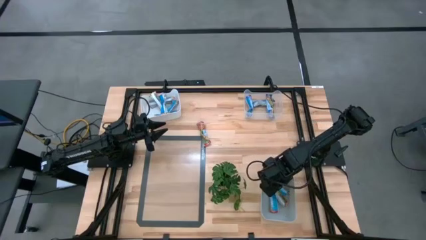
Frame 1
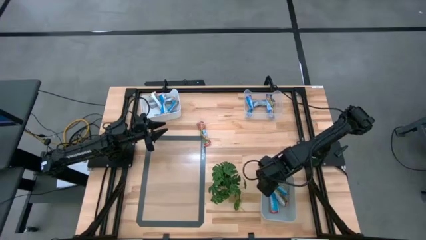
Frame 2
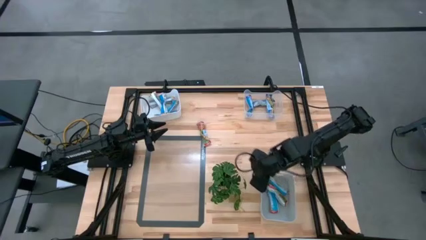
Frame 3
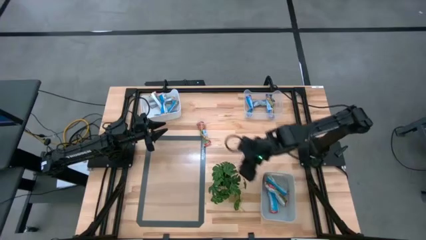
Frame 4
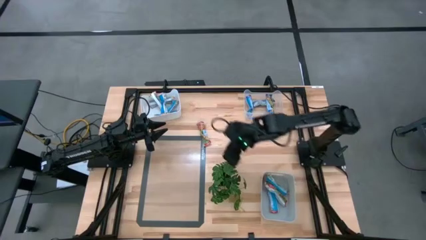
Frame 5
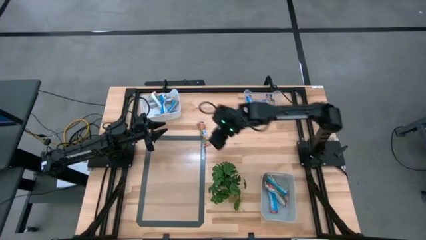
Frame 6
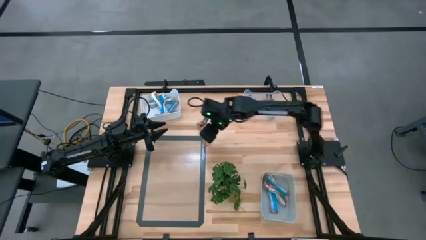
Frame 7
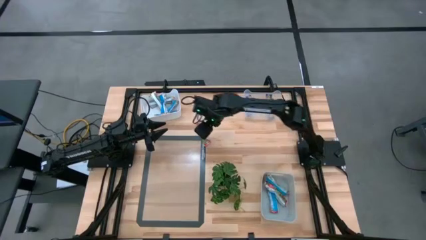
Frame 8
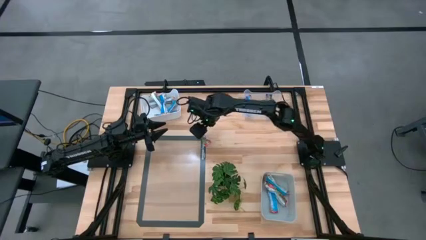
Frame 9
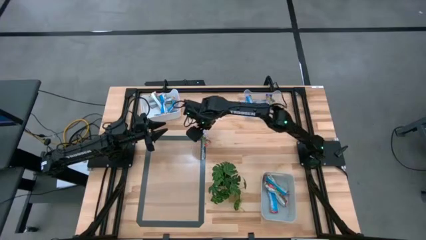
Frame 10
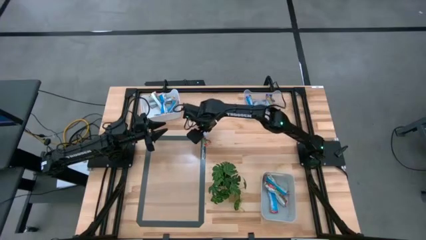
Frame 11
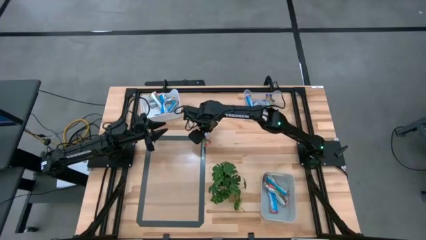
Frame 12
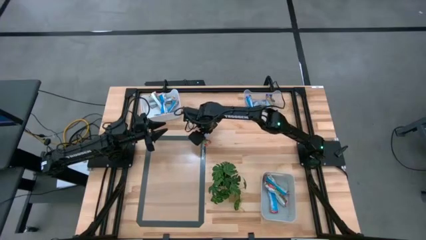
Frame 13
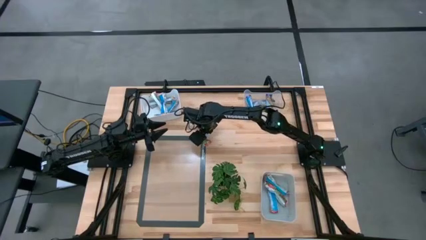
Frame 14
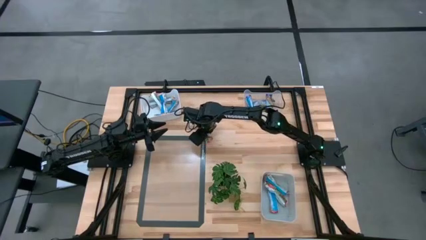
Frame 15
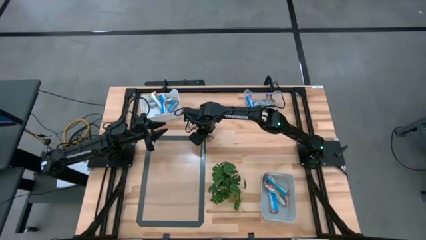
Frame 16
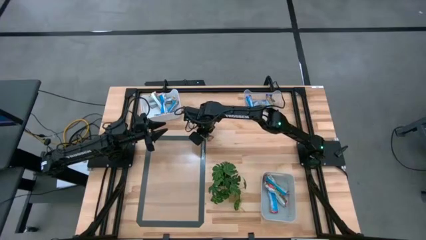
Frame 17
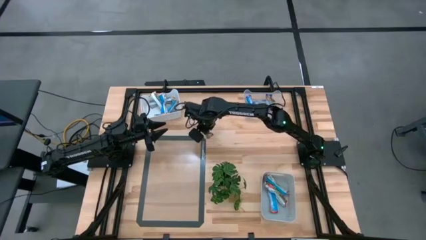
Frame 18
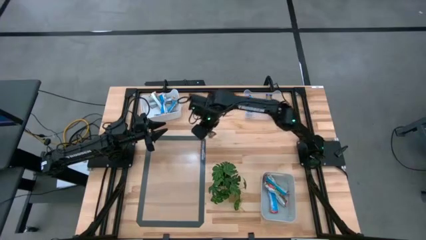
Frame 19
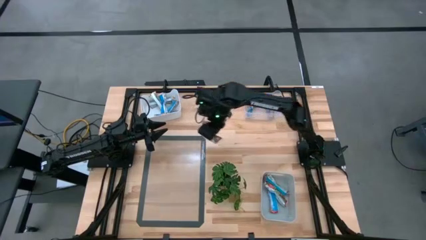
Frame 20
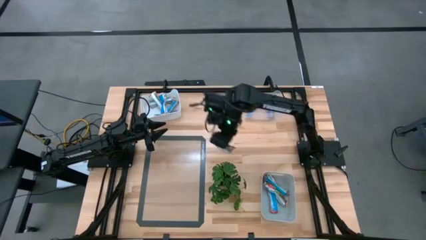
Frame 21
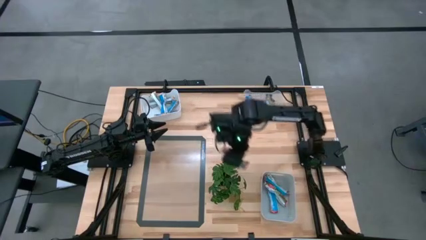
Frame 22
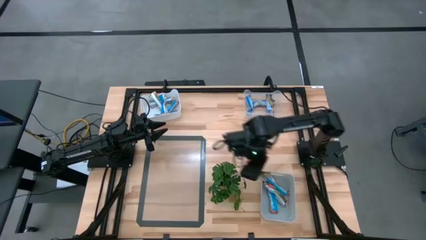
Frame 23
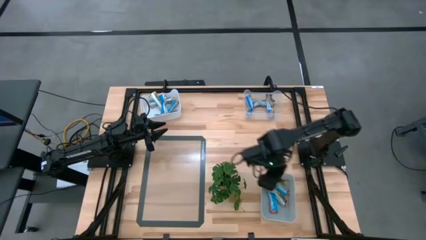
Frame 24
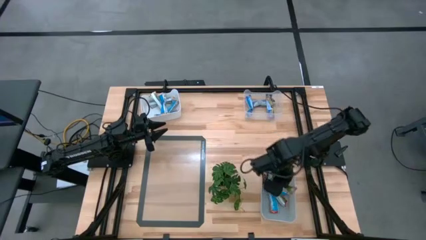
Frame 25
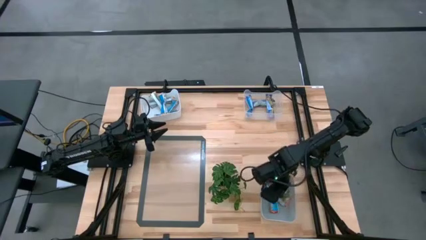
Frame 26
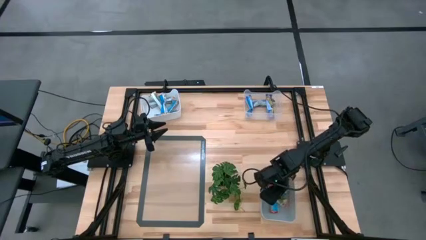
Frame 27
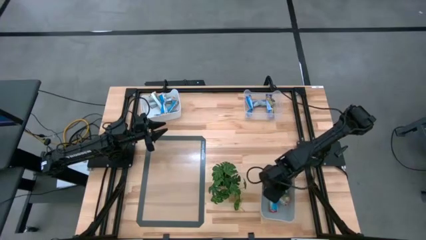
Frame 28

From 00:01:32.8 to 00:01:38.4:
Task: Pick and place Granola Bars by type
Put the red granola bar into the gray bin

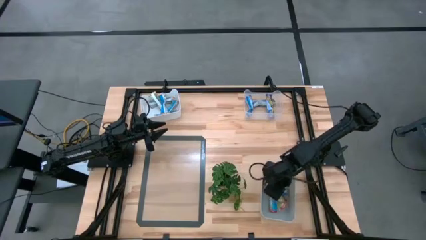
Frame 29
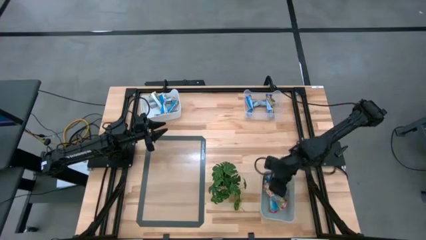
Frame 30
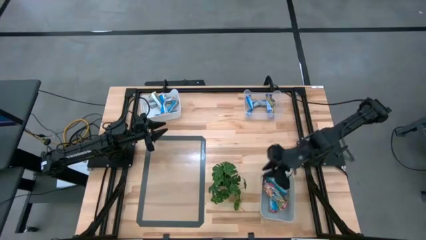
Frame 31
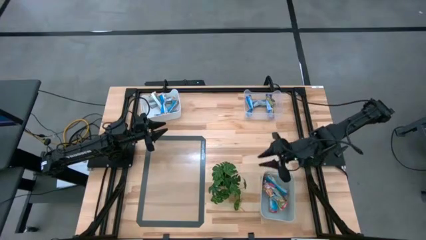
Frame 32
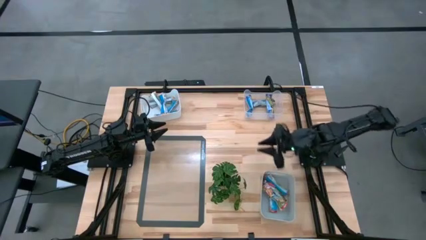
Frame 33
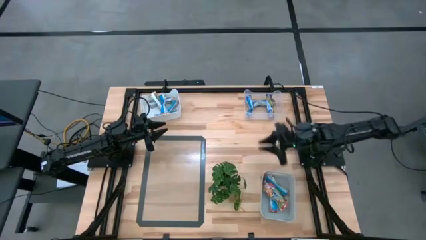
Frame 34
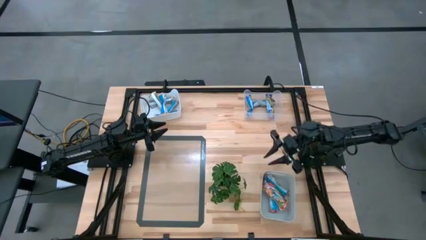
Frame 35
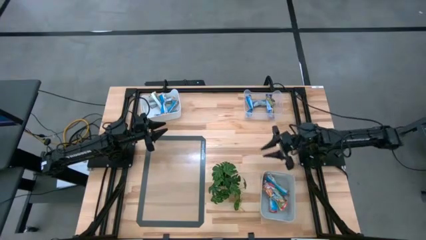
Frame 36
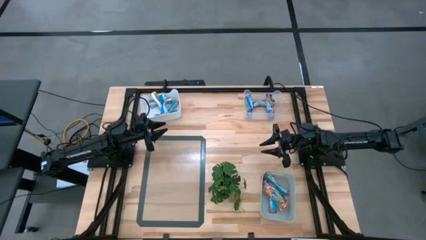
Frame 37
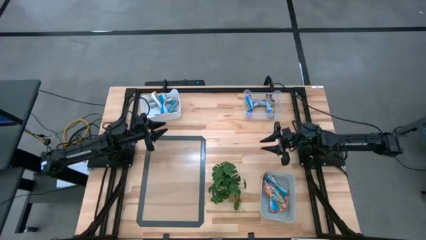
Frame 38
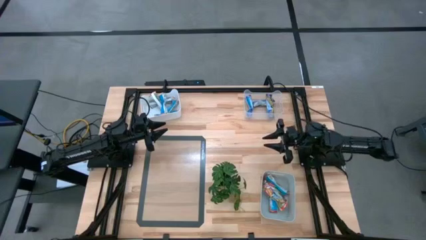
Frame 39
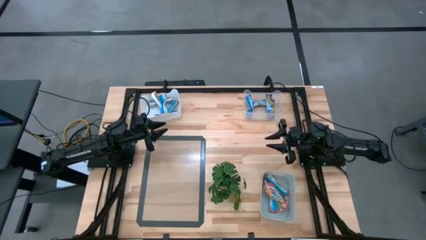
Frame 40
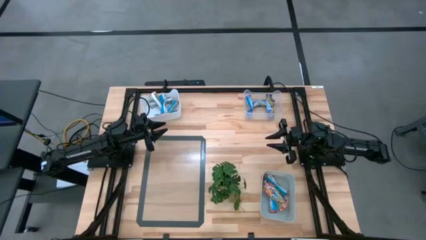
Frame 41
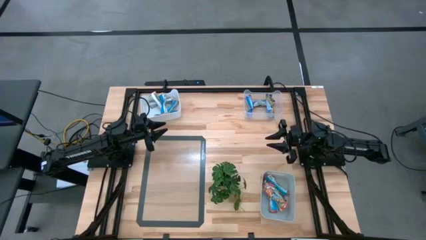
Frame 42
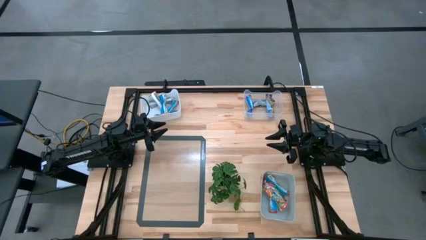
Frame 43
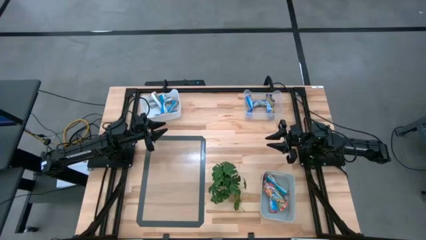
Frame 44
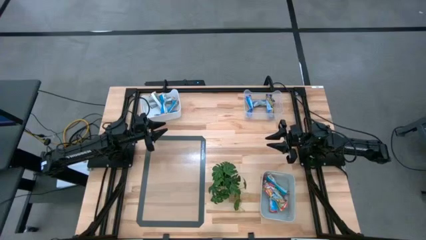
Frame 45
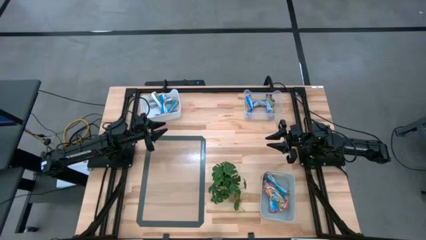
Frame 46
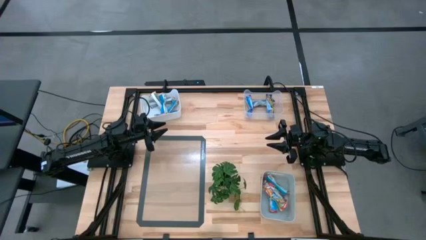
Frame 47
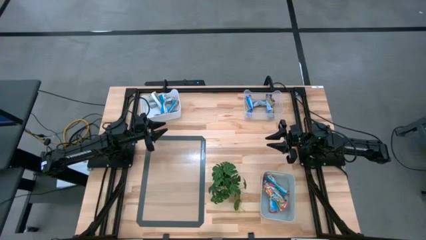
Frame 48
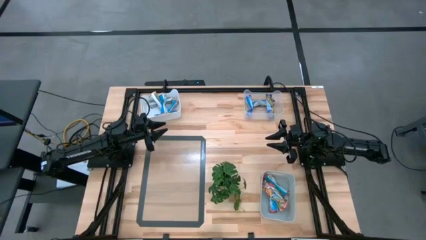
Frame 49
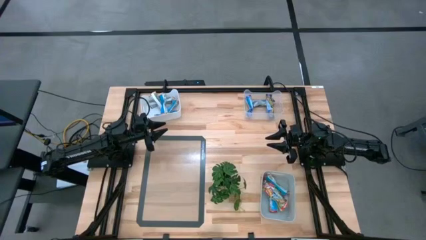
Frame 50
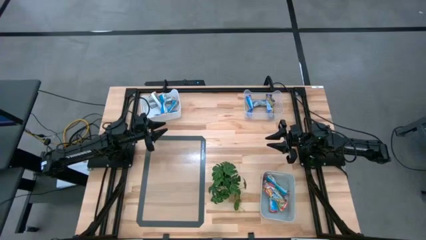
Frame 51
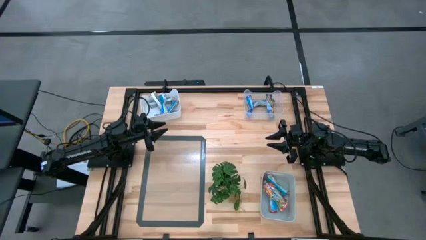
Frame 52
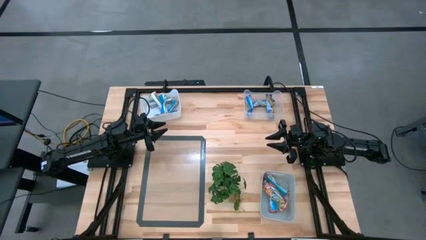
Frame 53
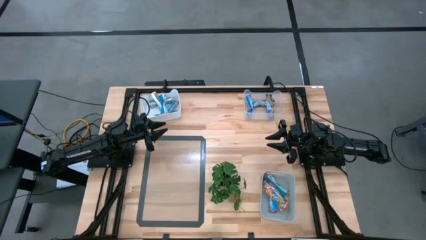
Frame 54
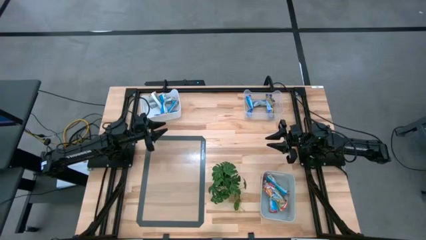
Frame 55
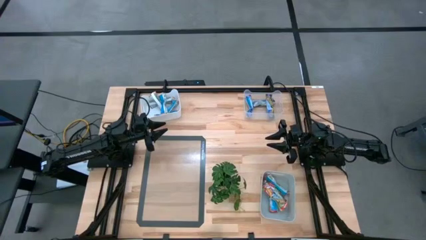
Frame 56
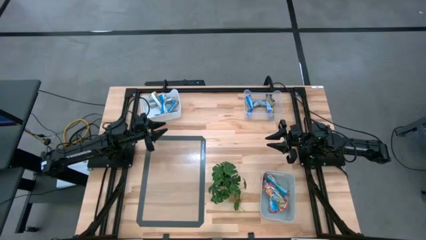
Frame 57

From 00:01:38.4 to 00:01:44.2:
Return to Home Position

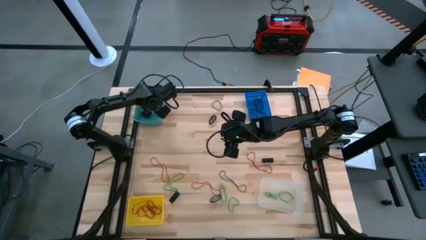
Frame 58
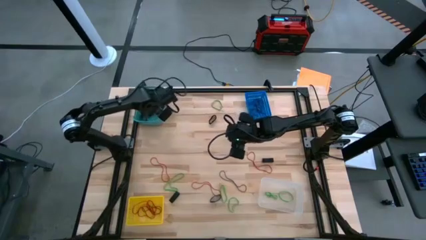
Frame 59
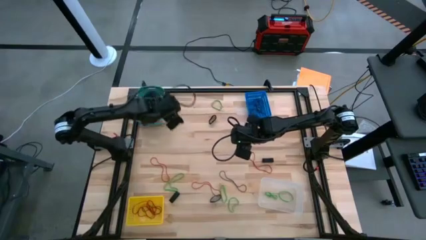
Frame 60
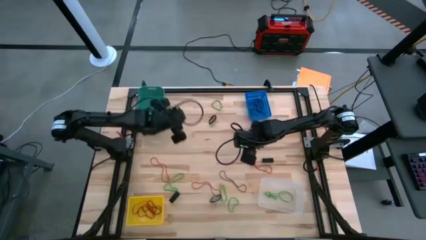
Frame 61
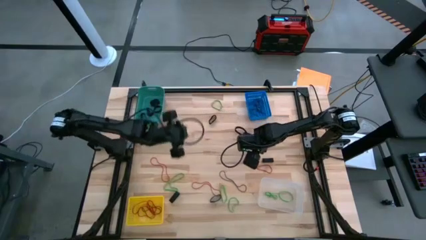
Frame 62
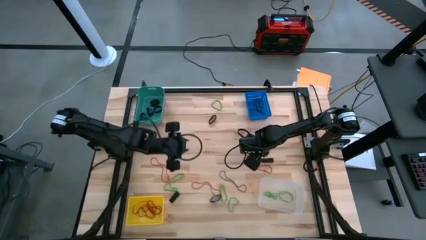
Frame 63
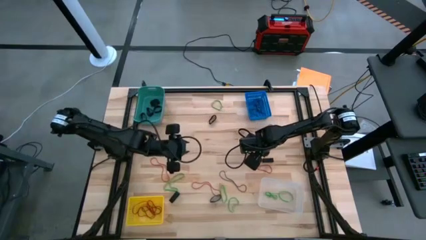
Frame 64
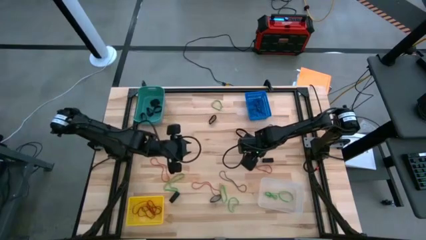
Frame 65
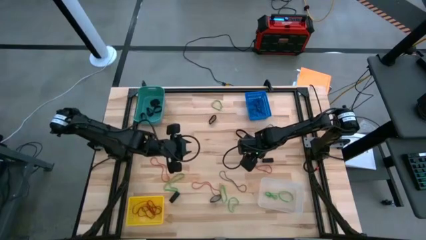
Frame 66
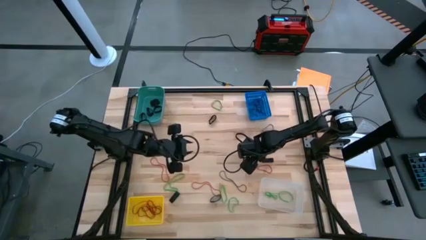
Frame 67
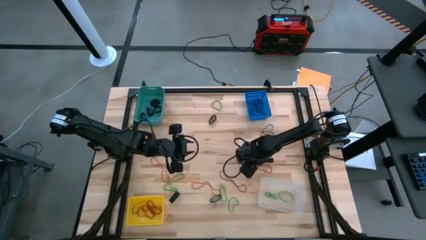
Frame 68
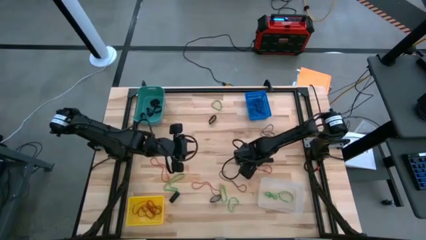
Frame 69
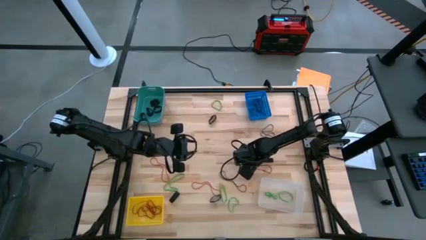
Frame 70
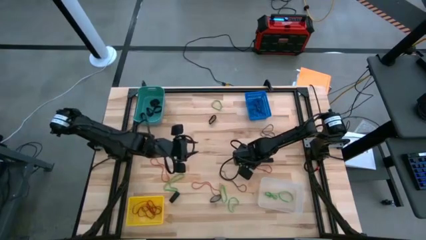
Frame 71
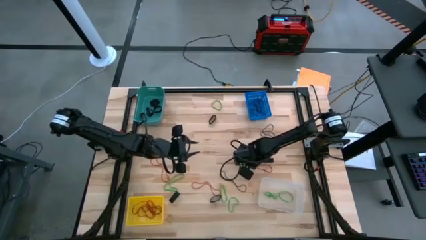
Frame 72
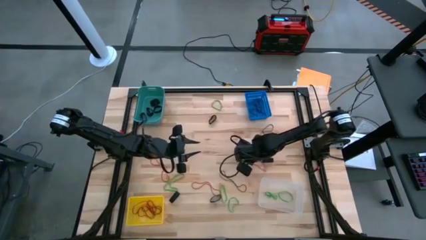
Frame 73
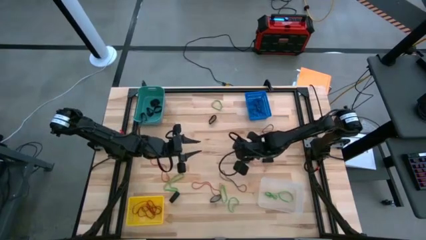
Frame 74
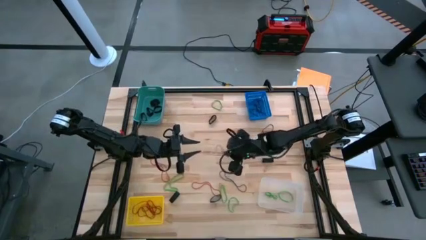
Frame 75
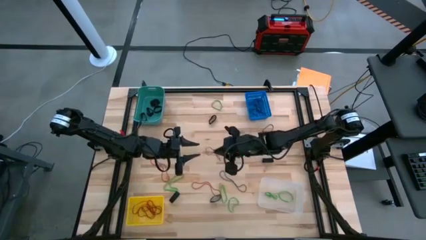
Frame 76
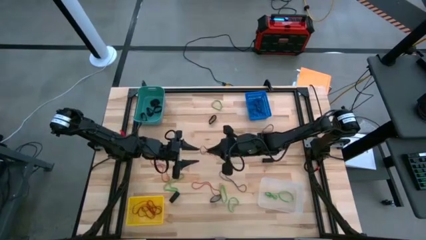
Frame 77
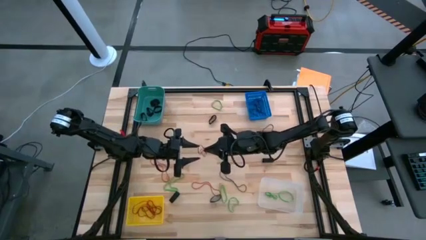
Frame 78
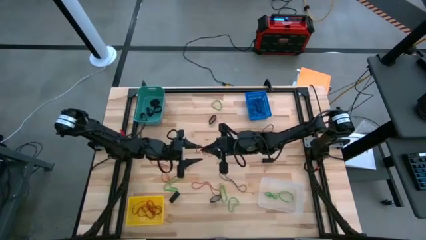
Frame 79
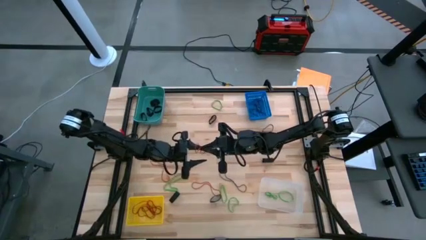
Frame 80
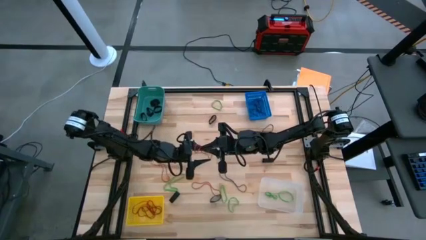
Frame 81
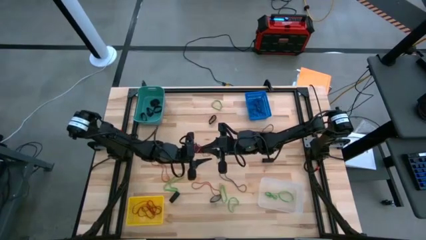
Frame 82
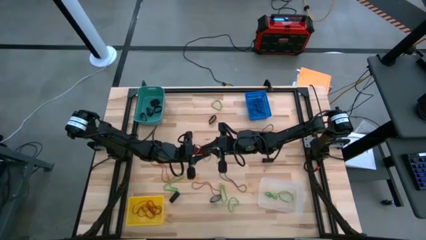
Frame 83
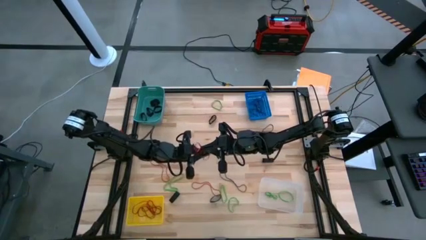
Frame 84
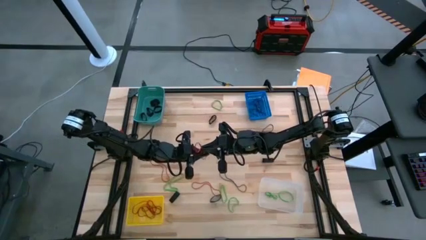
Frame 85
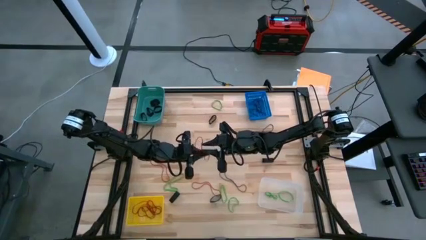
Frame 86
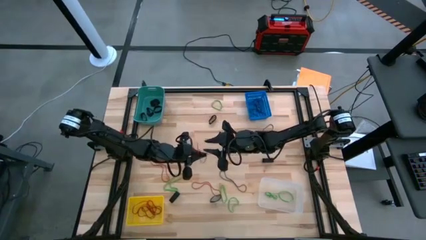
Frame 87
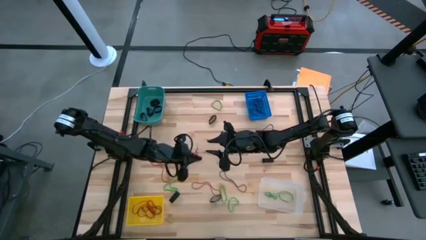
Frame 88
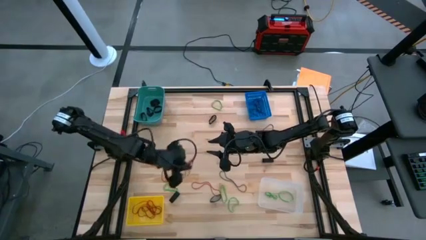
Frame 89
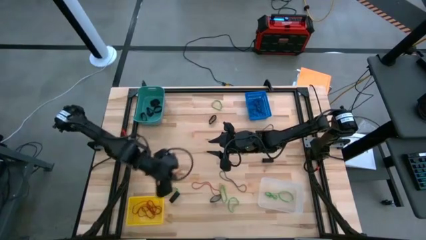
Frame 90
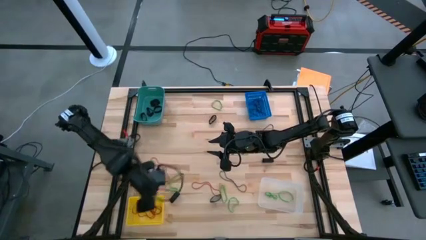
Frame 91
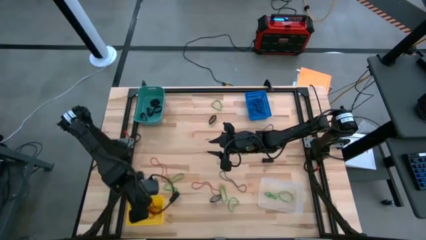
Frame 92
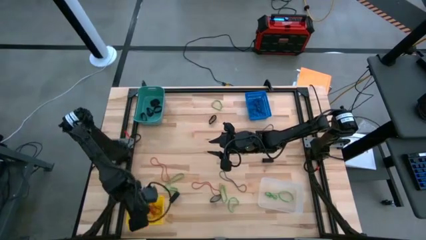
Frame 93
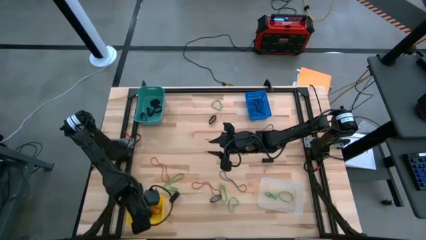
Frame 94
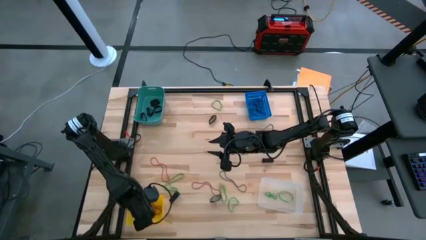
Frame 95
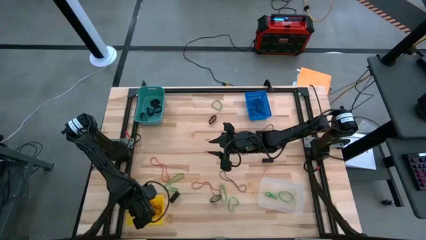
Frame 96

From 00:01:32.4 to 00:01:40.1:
Task: Sort rubber bands into baskets
Put the red rubber band into the yellow basket
